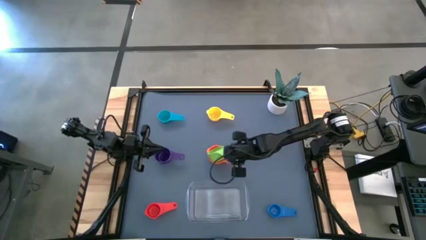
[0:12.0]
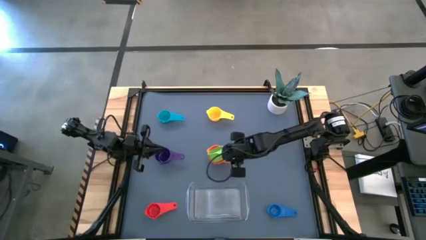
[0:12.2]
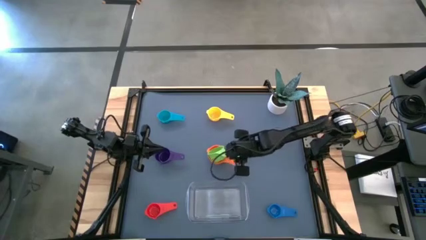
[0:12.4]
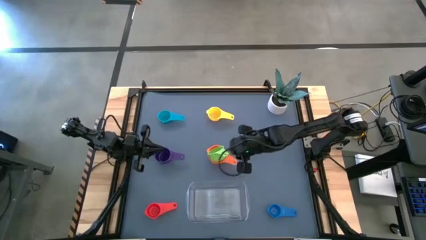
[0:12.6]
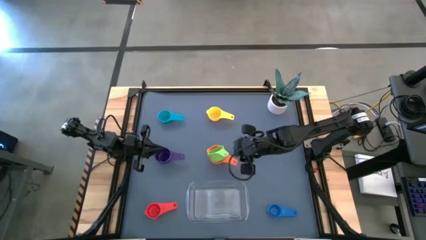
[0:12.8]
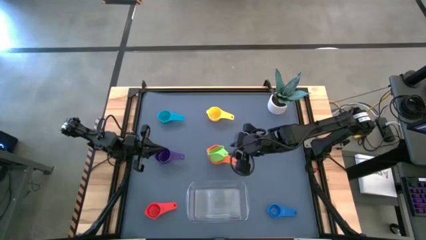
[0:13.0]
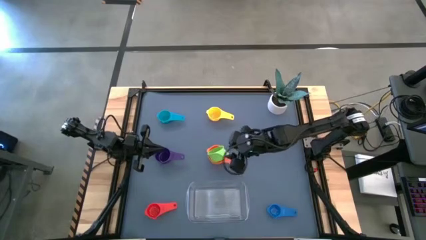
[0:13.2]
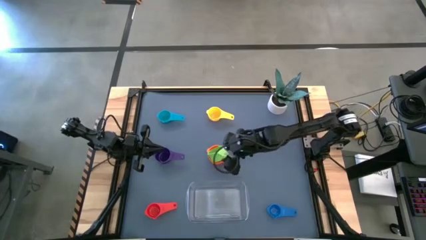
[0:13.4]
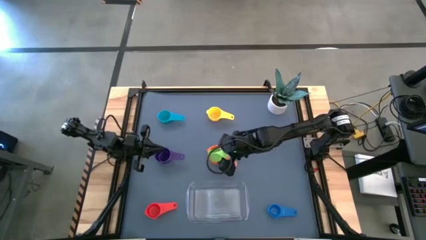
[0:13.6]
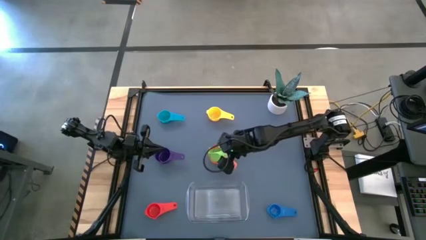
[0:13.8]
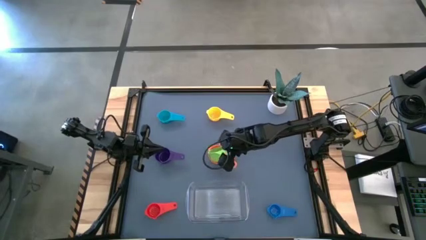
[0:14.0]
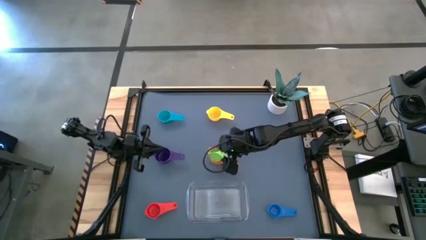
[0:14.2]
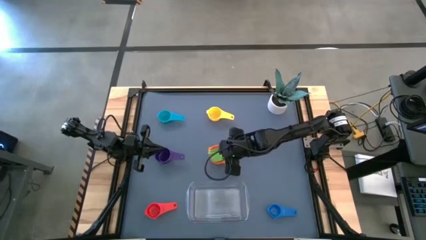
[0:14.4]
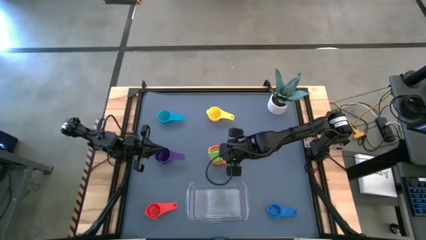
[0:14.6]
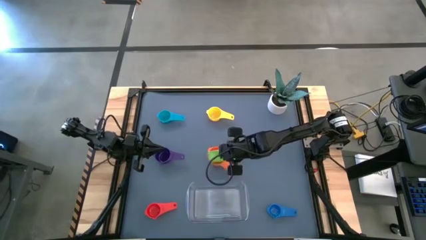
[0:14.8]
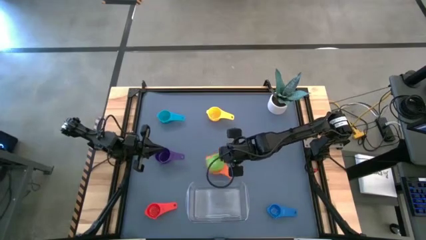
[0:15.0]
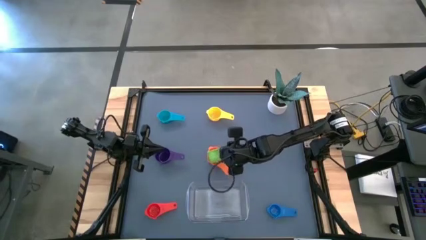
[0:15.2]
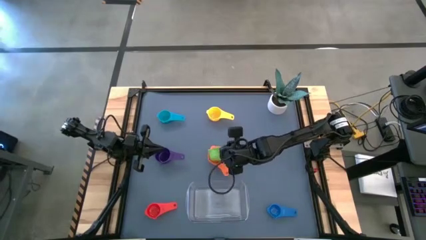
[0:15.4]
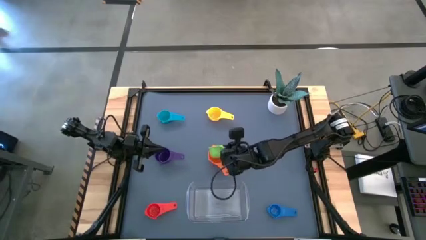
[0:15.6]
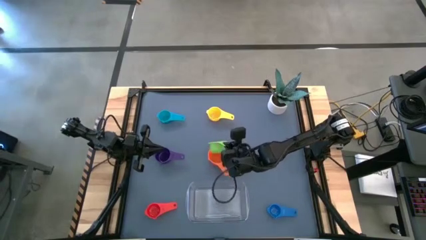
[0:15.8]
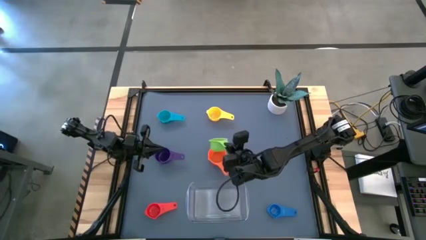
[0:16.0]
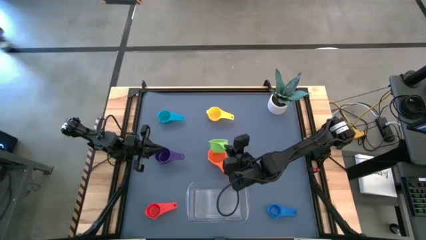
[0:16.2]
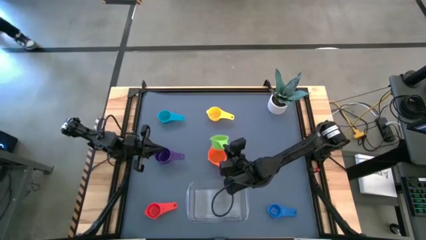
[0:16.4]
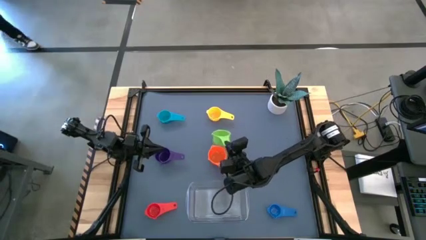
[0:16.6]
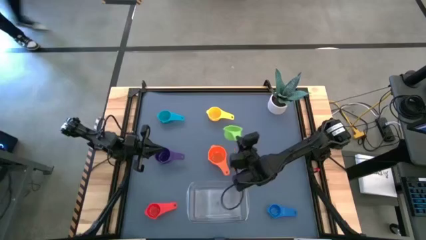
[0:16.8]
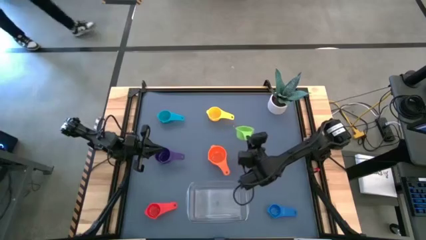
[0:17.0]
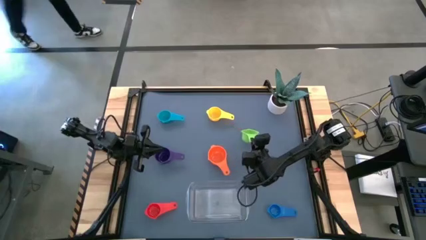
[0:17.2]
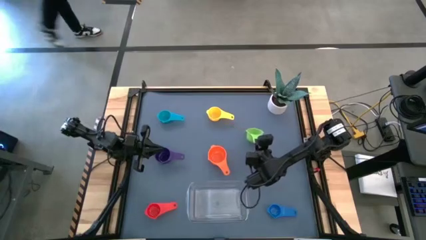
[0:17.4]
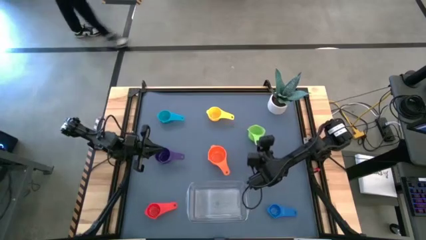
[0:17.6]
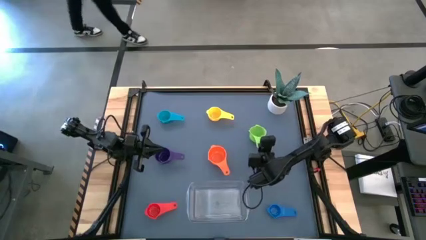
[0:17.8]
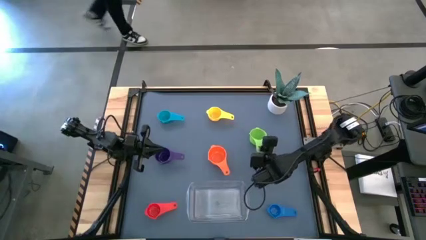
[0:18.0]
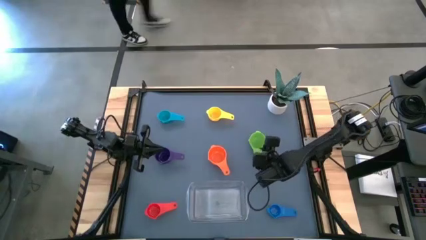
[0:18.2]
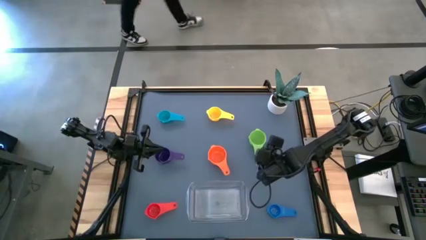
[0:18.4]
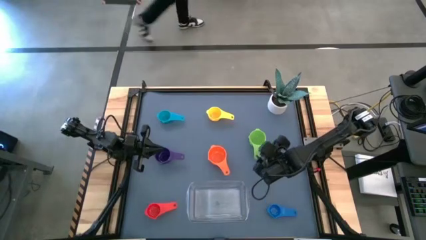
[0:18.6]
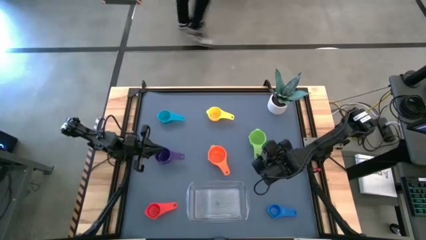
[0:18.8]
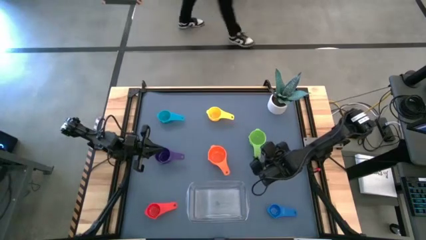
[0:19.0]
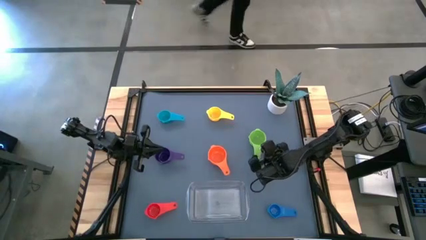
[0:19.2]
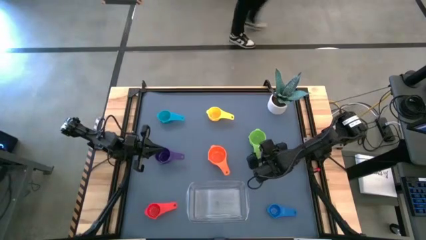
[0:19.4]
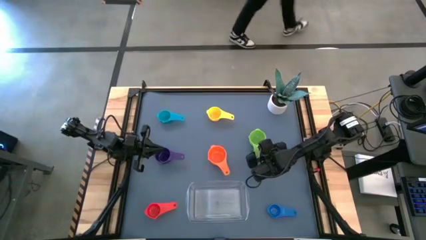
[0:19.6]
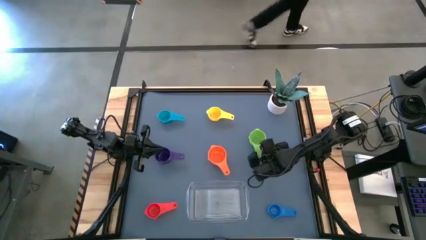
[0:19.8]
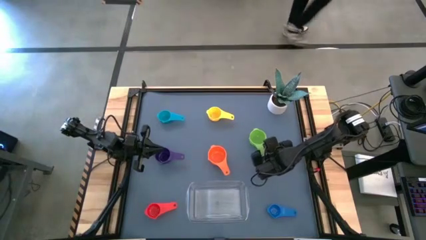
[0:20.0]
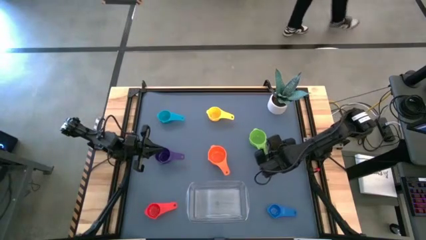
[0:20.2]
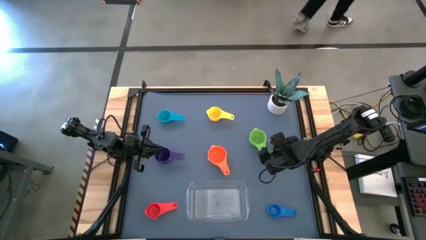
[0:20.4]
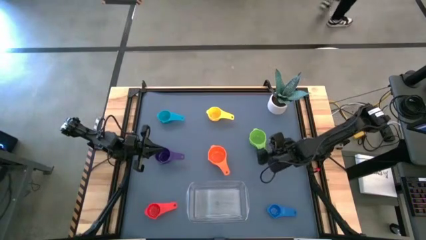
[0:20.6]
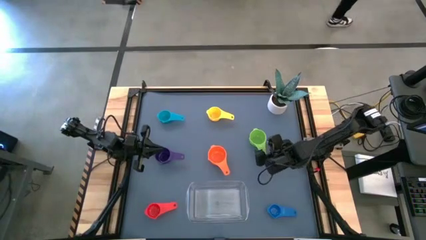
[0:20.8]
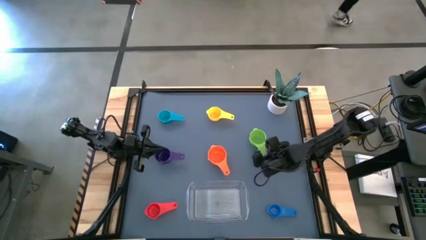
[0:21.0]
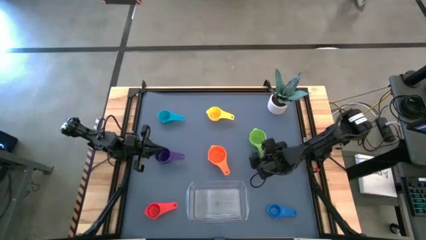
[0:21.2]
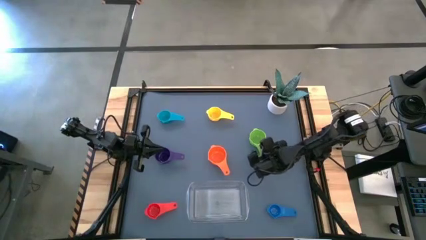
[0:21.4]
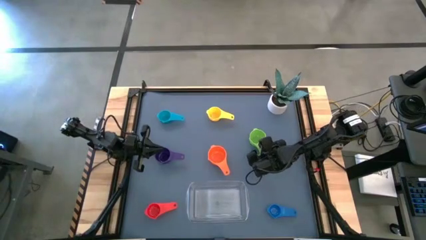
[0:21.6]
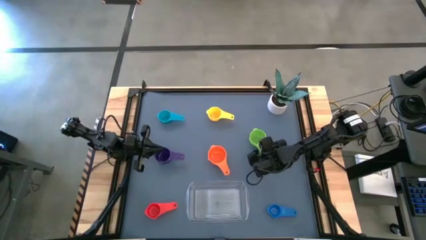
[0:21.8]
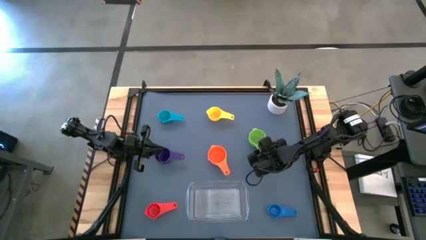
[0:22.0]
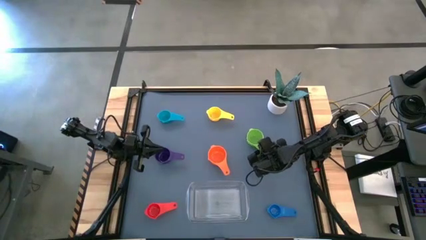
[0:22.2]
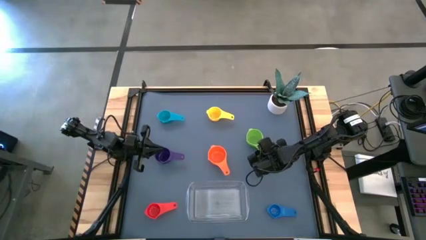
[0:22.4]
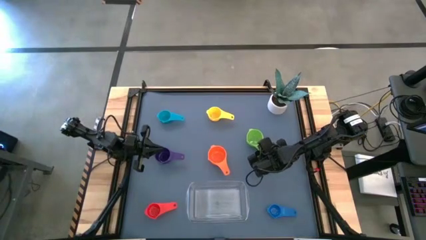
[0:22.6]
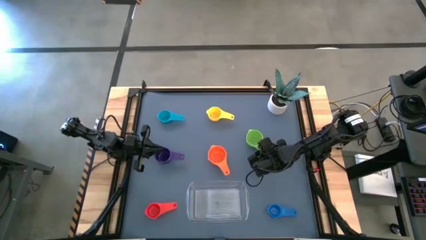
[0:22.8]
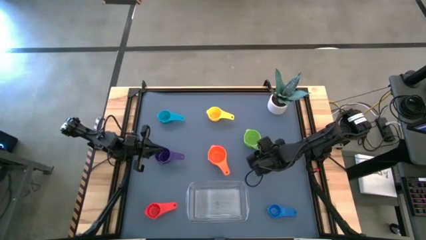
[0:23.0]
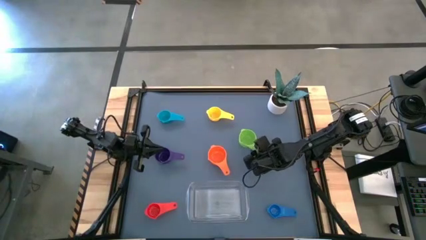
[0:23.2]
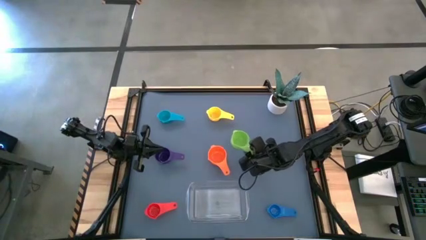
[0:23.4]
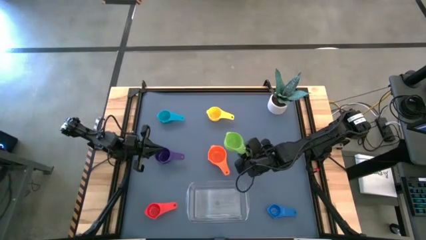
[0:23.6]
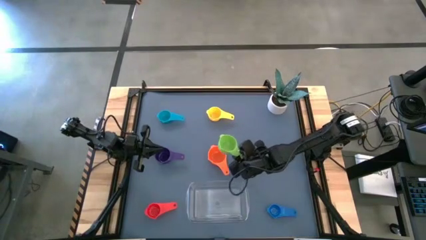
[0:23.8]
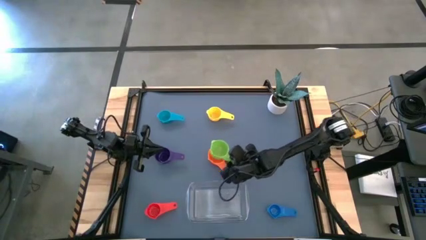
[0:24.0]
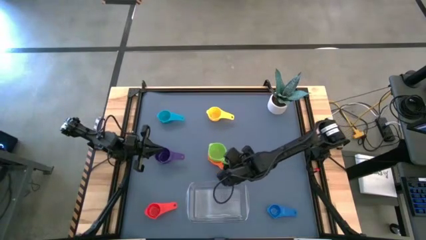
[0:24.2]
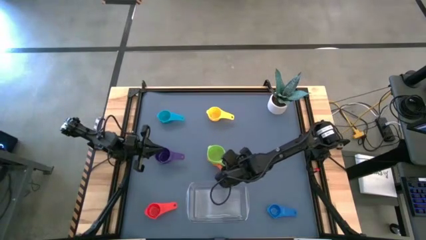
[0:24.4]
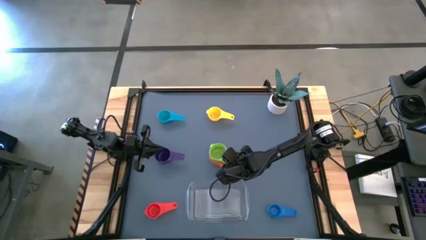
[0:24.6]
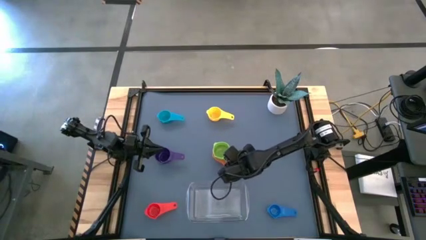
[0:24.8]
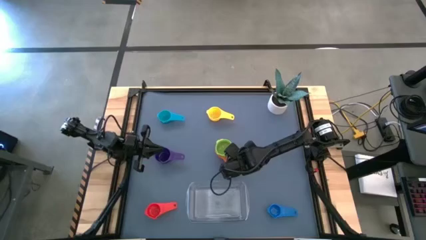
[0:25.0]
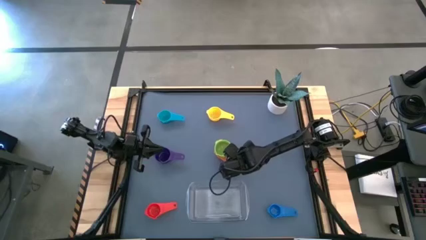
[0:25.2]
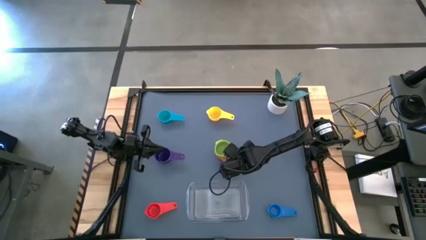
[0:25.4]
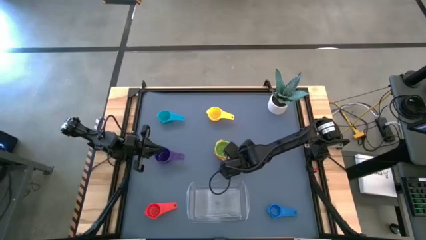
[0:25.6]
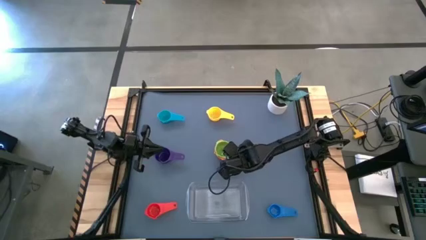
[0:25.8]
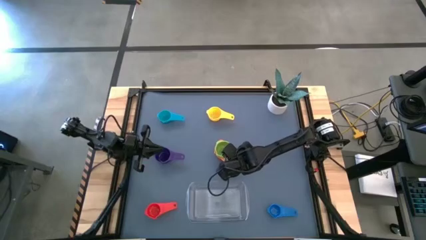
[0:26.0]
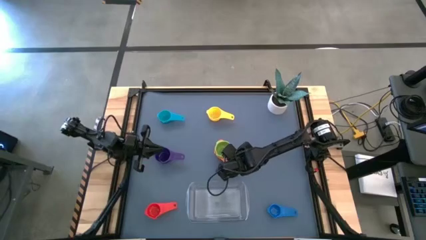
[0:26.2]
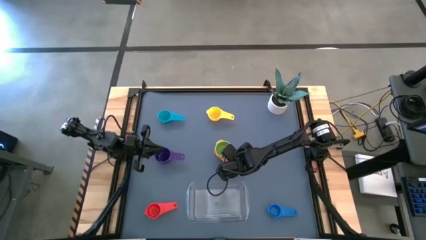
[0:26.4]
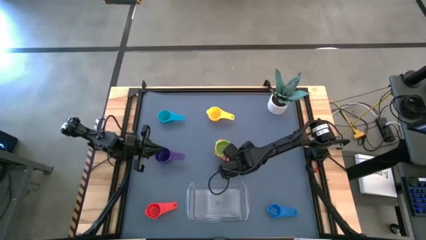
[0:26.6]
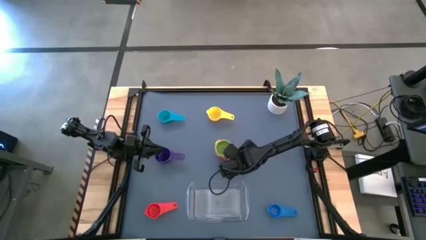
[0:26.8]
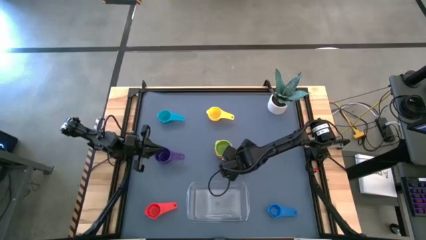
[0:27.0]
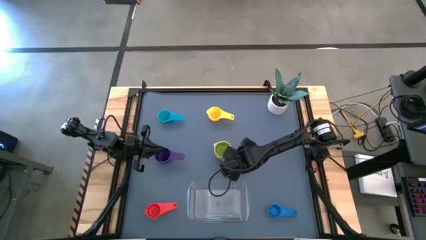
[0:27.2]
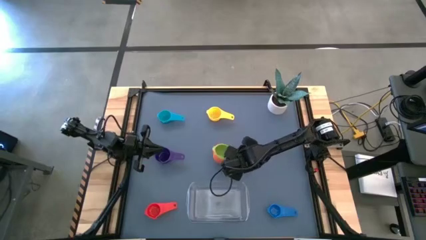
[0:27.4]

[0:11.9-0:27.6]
Task: Nest measuring cups in basket
Stack the green measuring cup on the orange measuring cup
